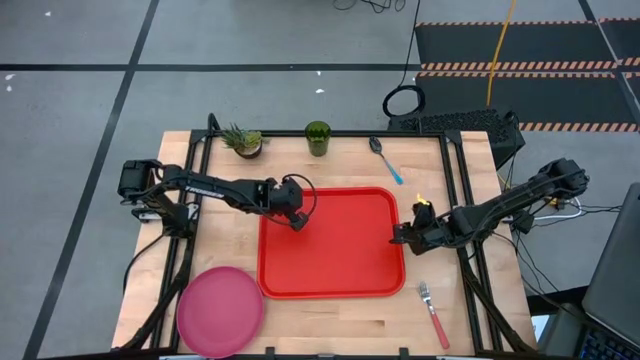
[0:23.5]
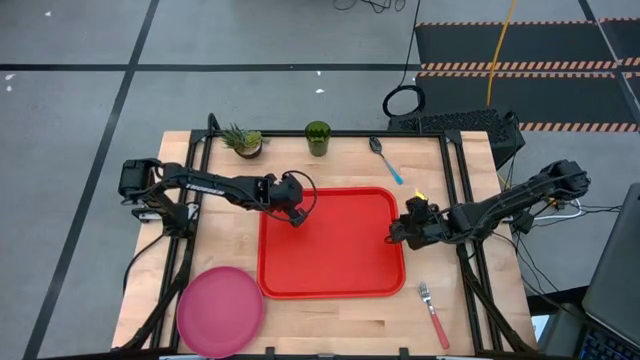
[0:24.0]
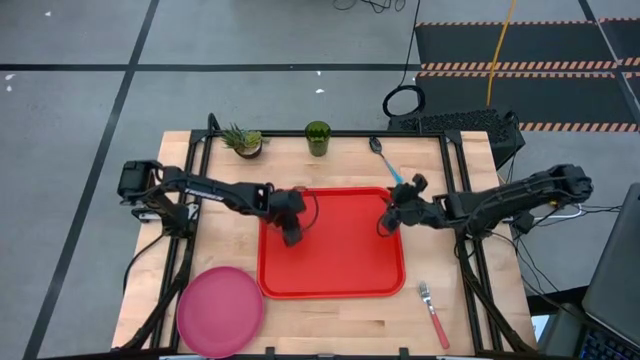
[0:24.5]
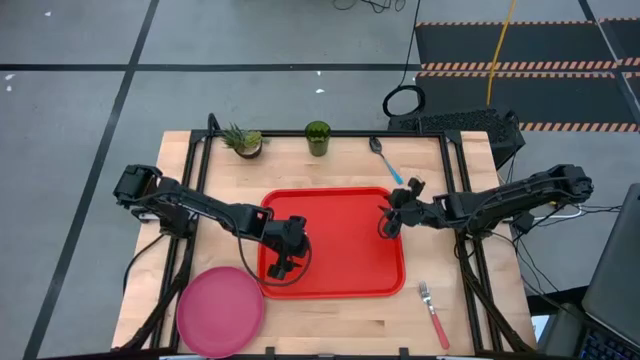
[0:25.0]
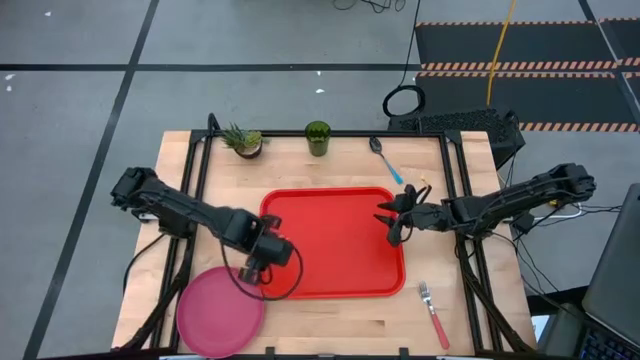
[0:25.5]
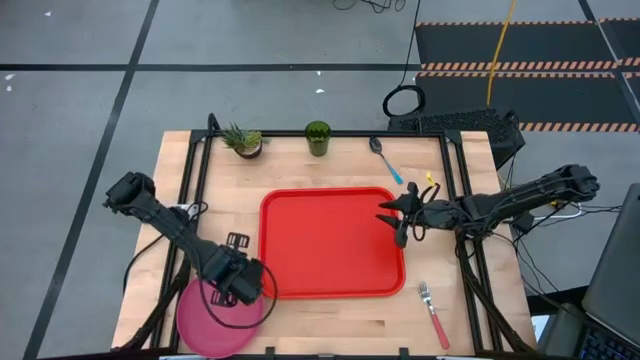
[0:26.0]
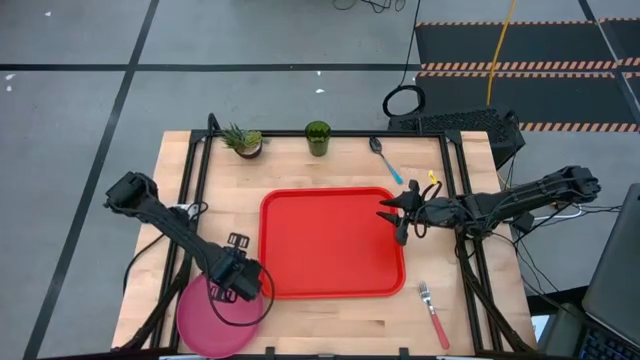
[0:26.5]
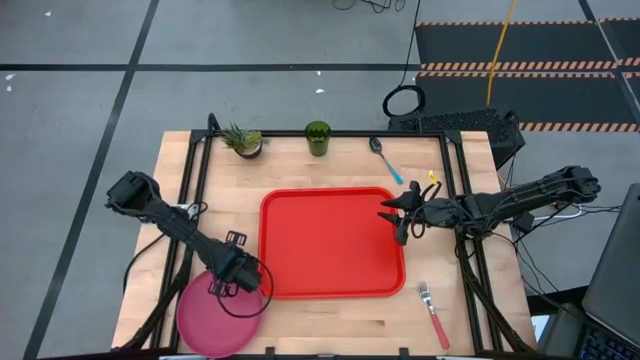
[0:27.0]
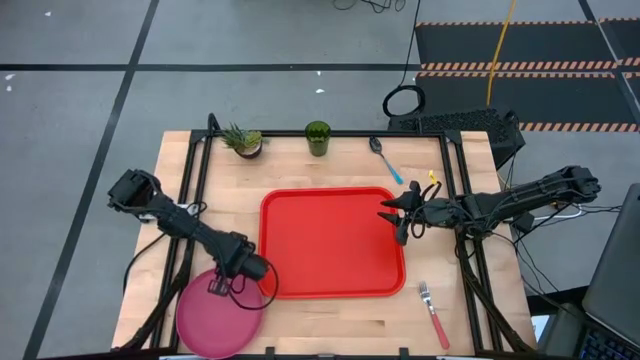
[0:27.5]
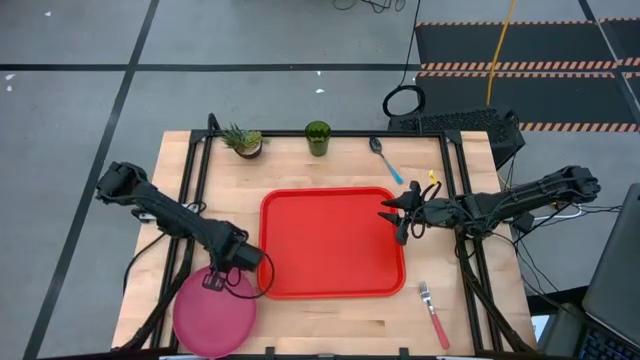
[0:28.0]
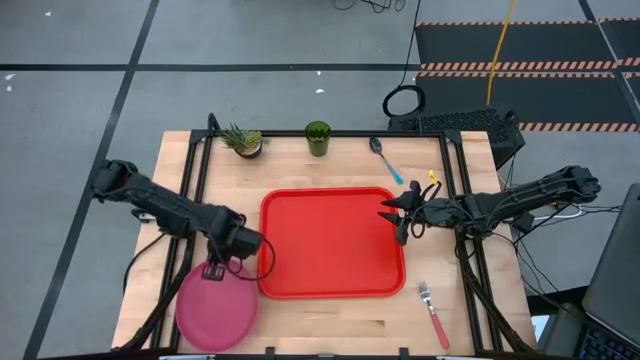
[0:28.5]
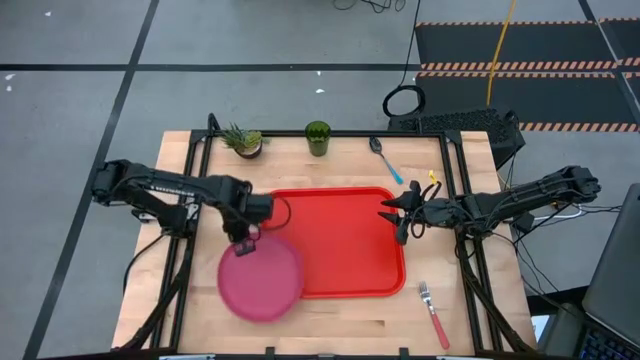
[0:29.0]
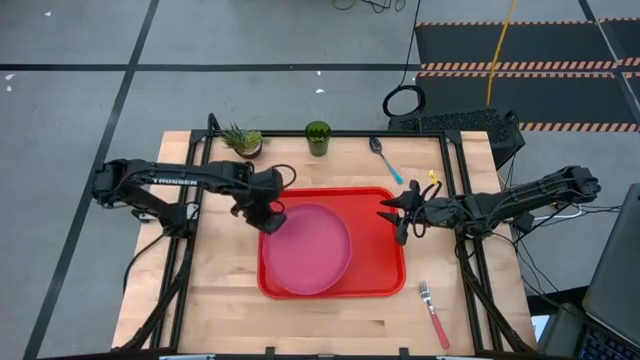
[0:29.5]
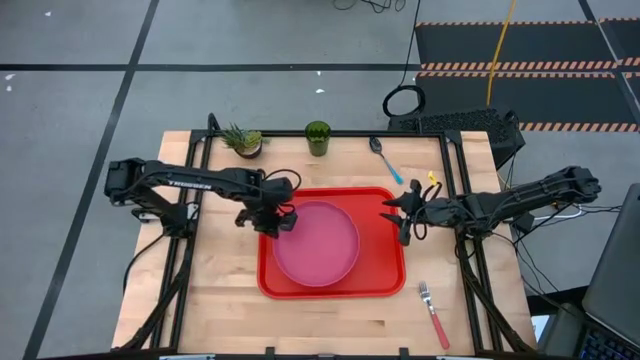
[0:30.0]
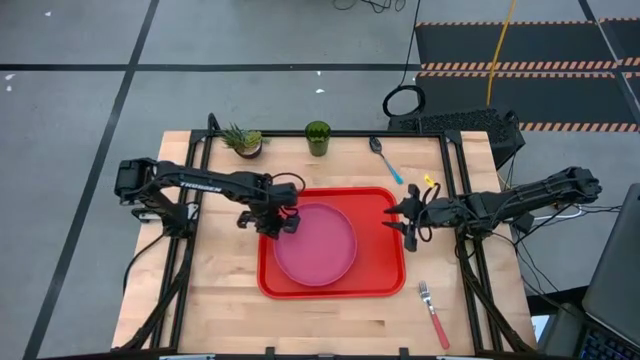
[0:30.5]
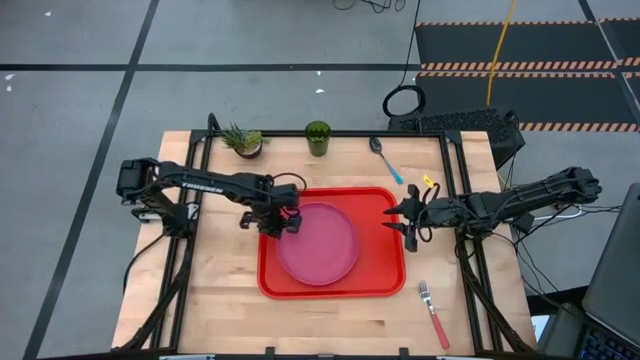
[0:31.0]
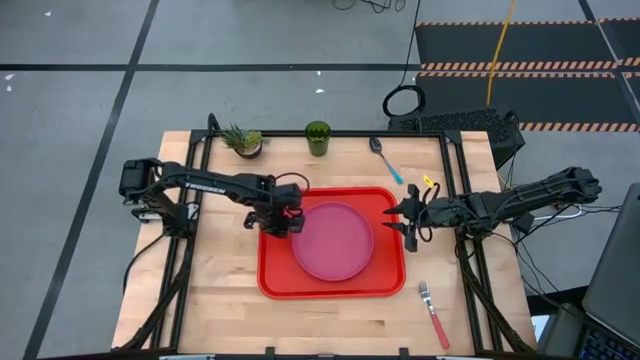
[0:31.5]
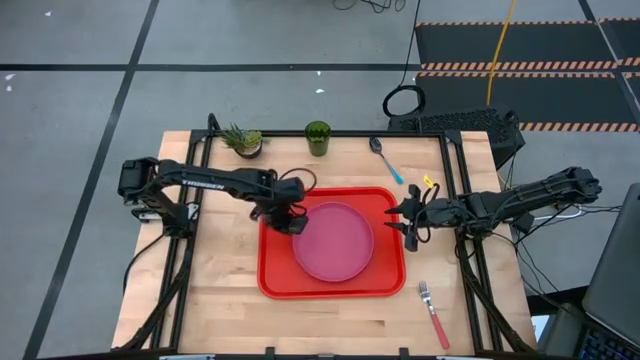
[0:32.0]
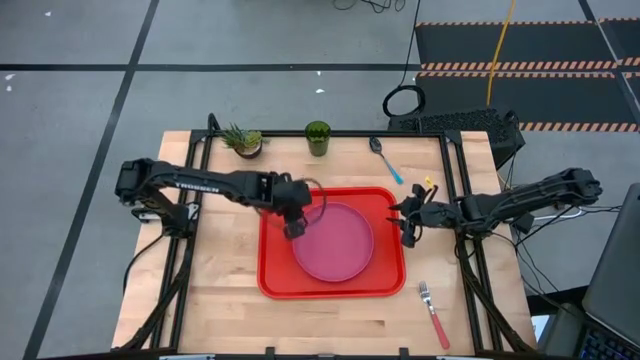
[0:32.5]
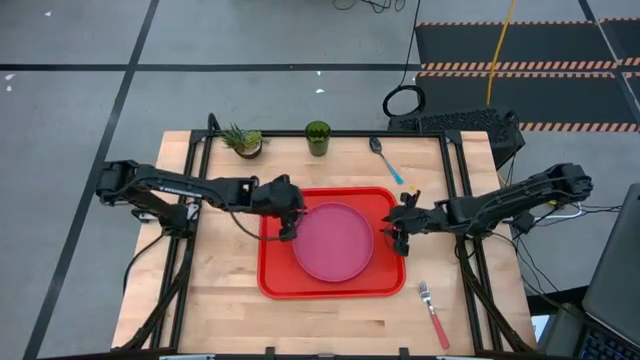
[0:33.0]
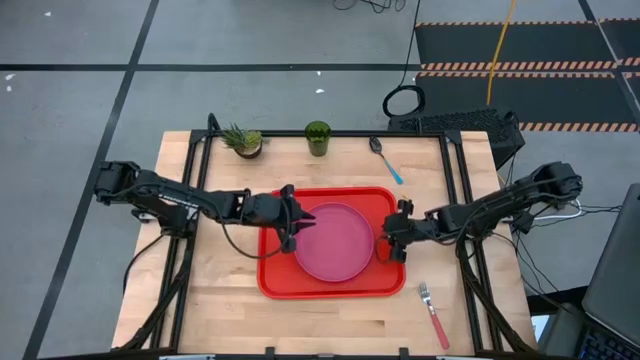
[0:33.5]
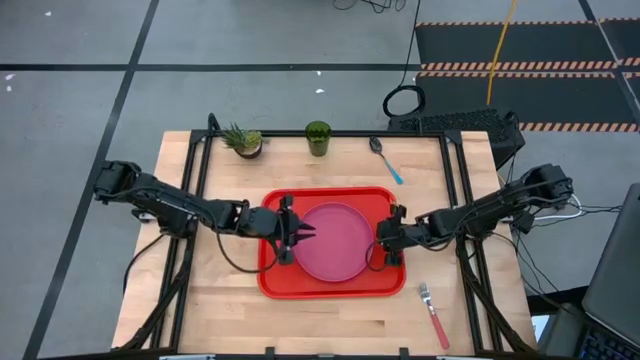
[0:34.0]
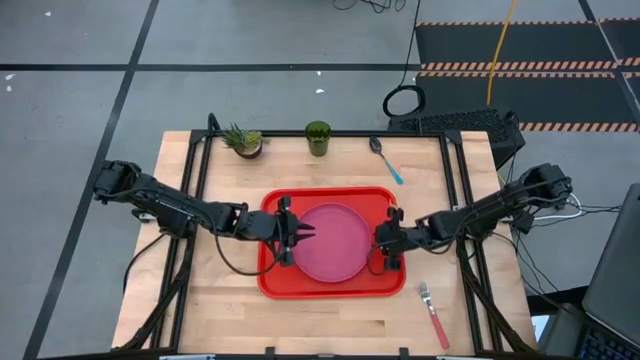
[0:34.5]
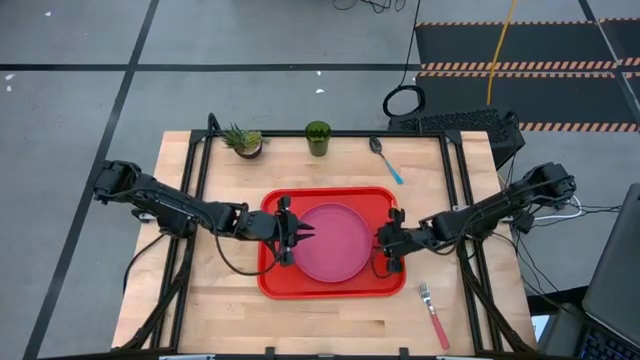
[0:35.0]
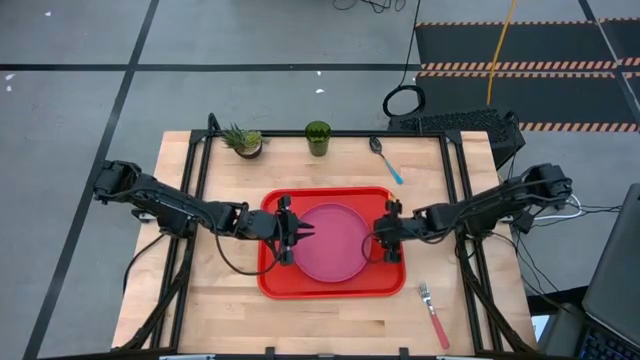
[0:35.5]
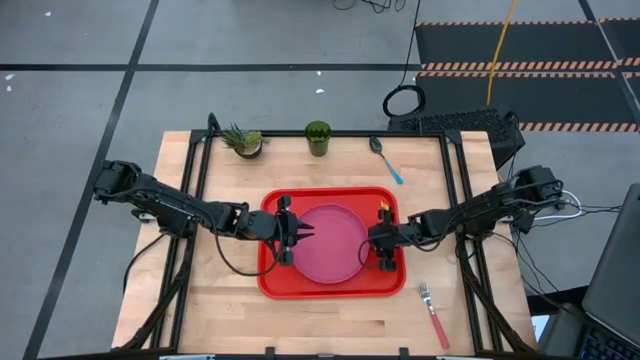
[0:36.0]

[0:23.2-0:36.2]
Task: Pick and place plate/cup/fork/spoon on tray
Put the pink plate on the red serving tray

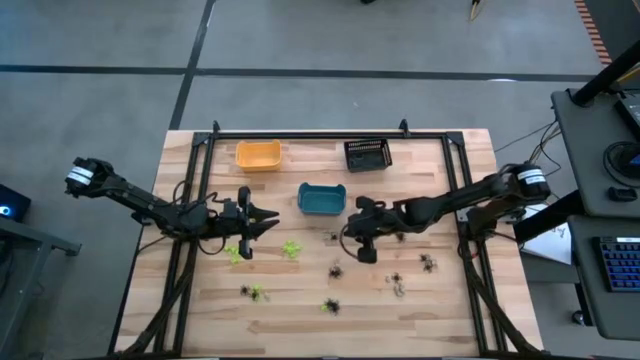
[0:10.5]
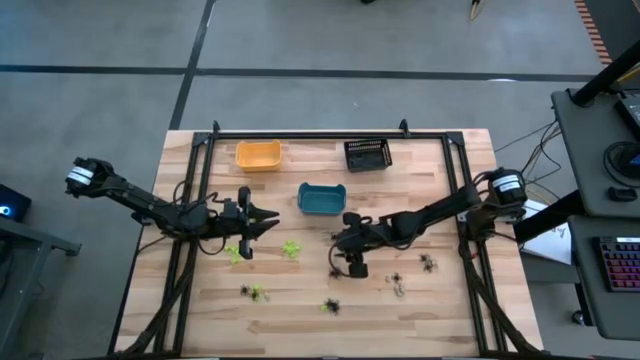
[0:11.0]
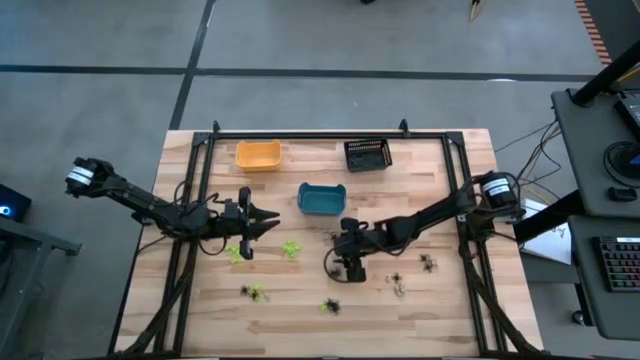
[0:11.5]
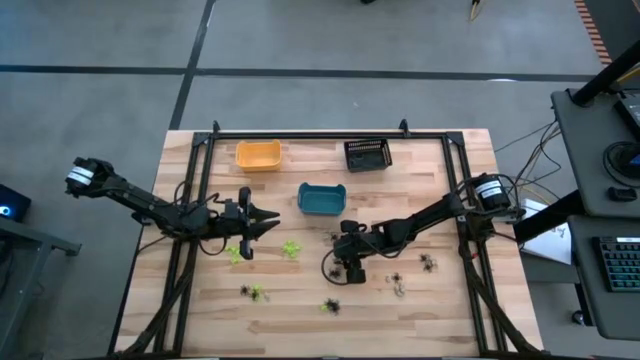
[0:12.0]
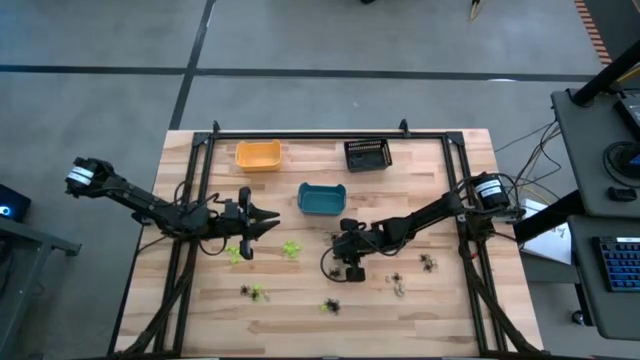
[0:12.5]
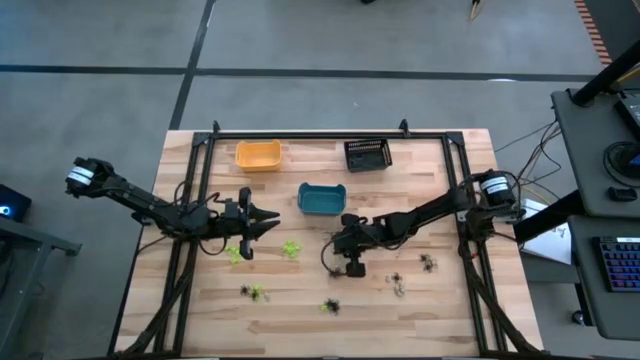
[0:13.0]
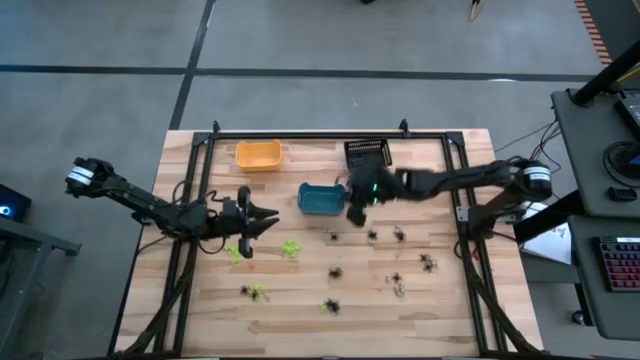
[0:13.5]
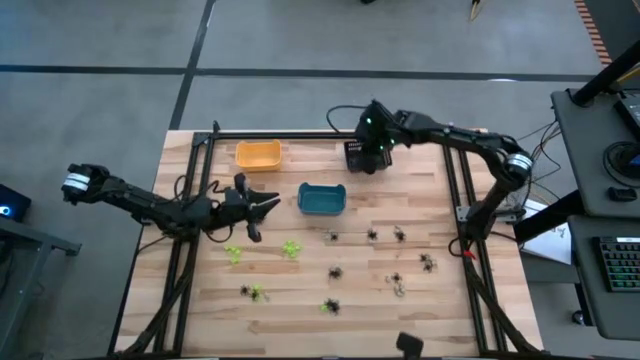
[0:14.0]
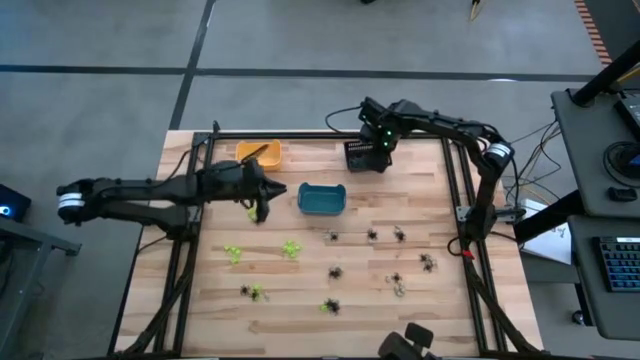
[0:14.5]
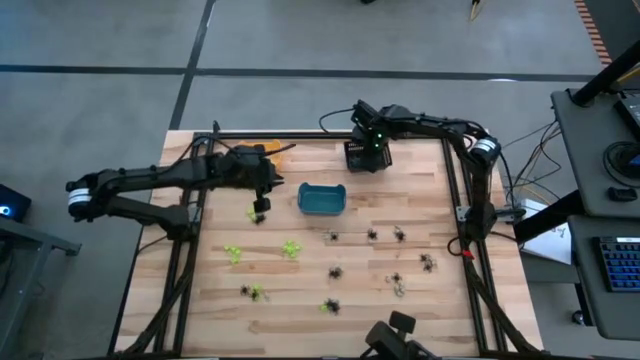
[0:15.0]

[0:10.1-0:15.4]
Task: Sort Halloween decoration
Put the white skull toy into the black bin
